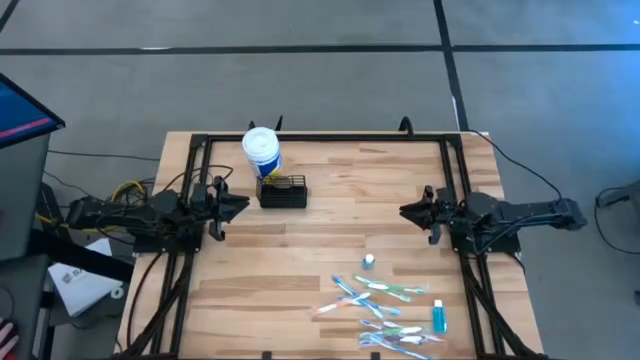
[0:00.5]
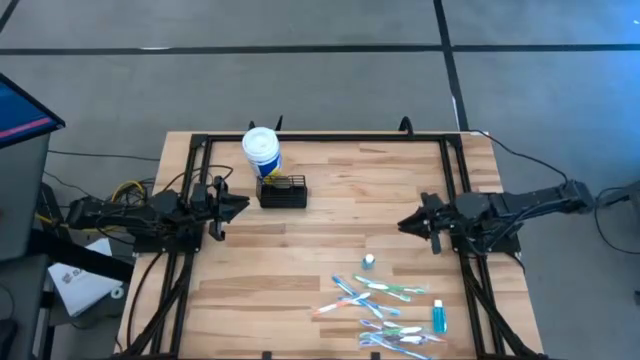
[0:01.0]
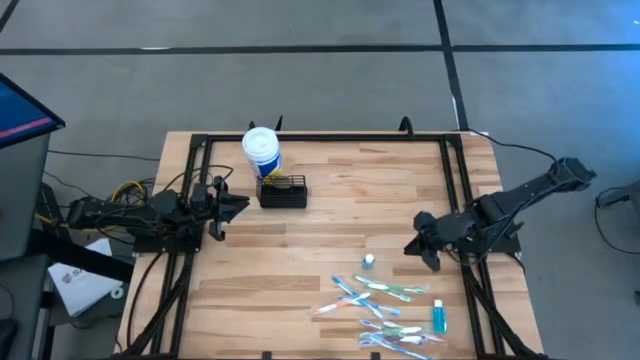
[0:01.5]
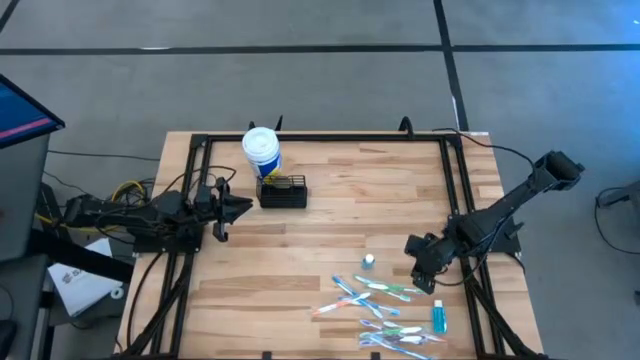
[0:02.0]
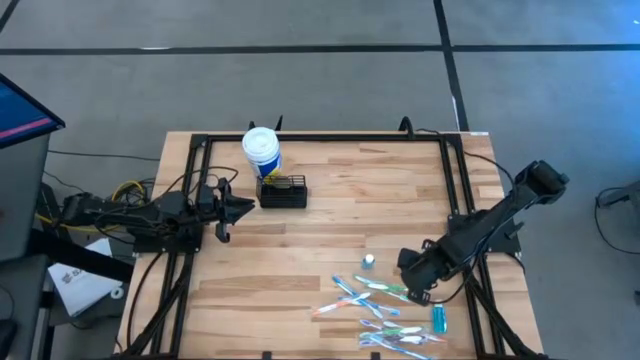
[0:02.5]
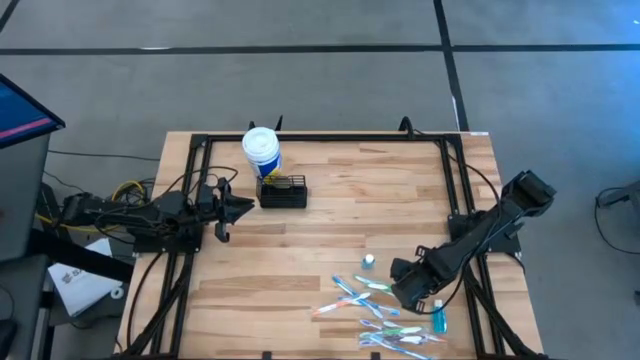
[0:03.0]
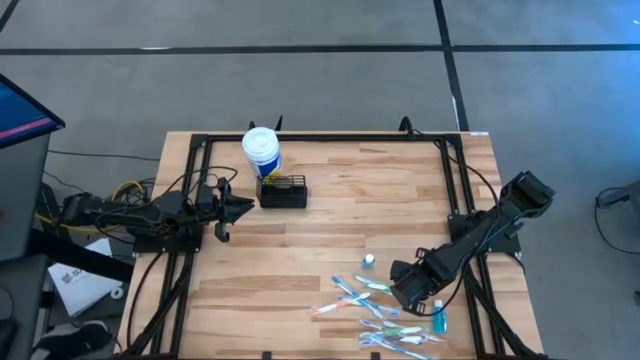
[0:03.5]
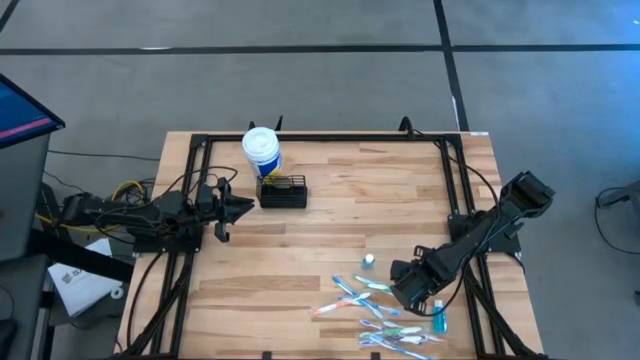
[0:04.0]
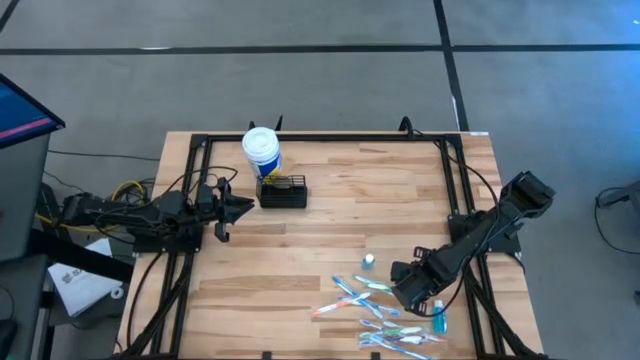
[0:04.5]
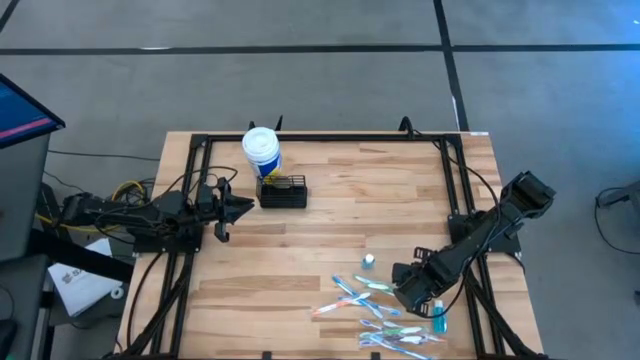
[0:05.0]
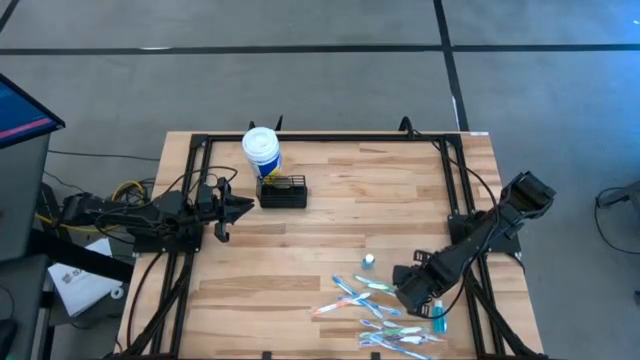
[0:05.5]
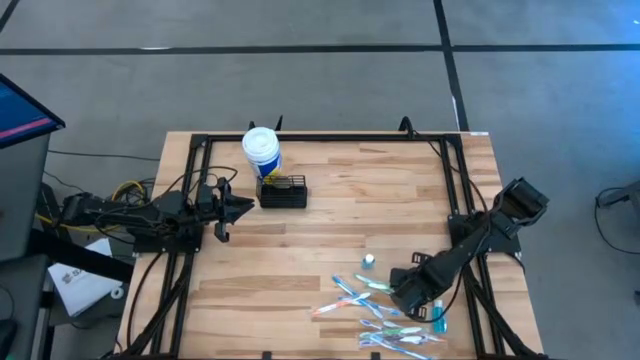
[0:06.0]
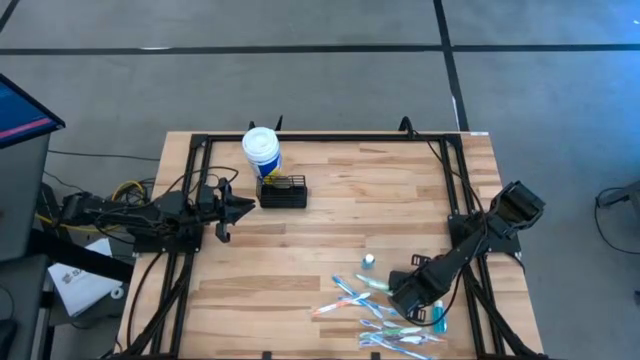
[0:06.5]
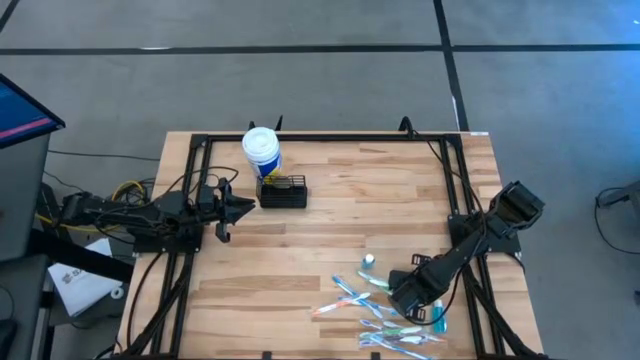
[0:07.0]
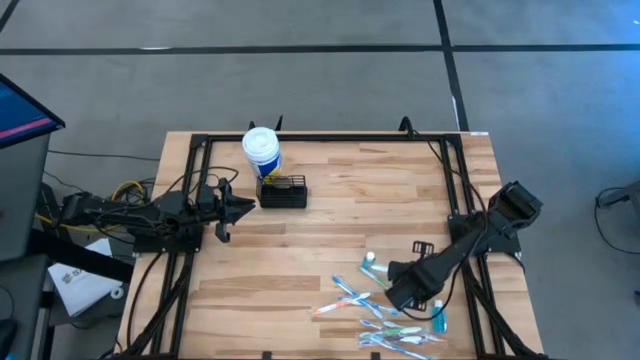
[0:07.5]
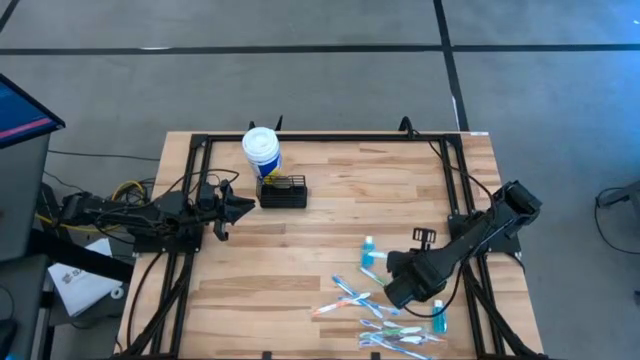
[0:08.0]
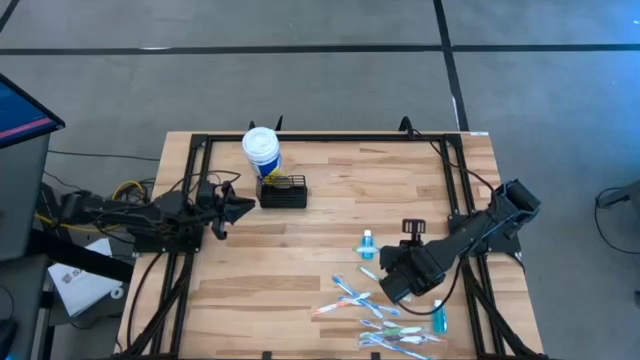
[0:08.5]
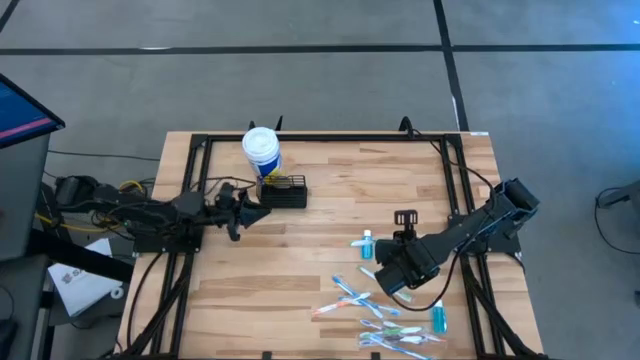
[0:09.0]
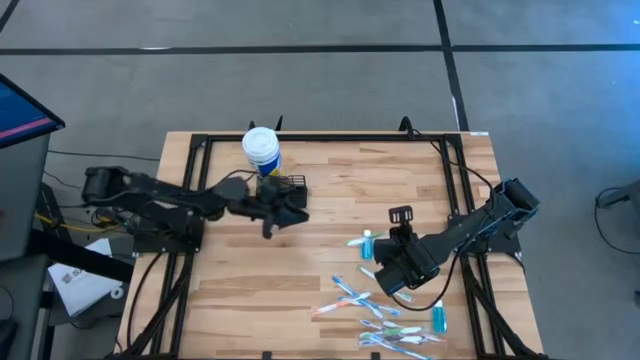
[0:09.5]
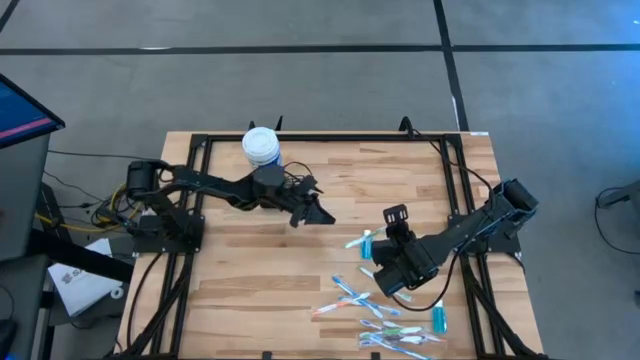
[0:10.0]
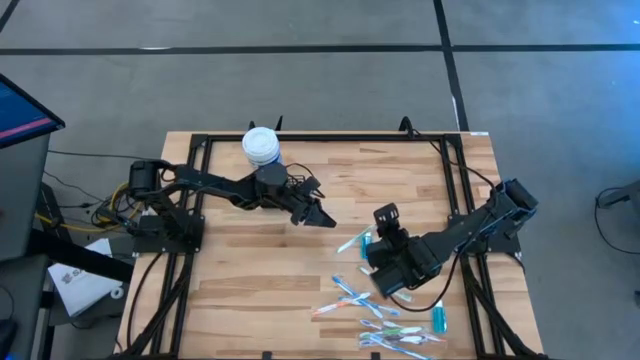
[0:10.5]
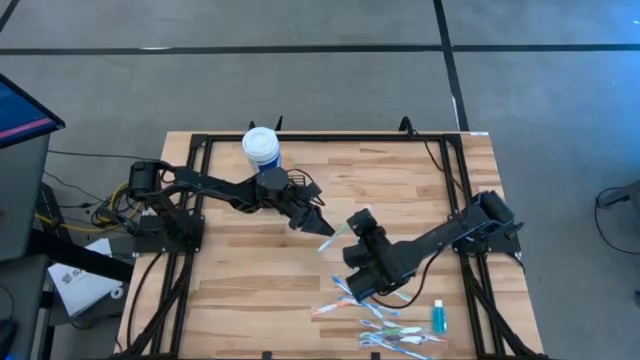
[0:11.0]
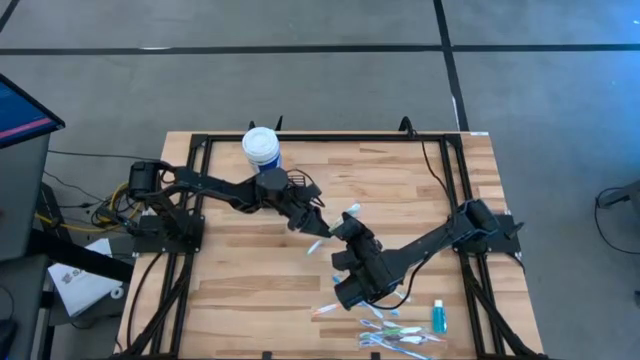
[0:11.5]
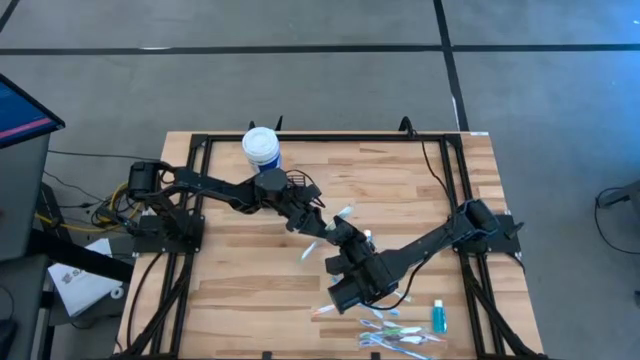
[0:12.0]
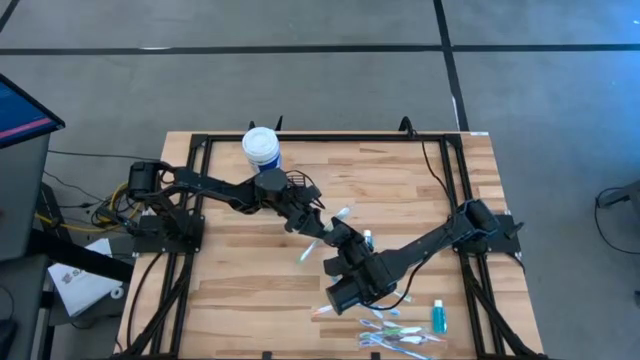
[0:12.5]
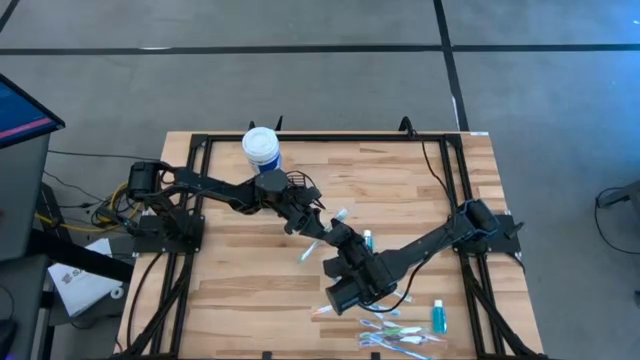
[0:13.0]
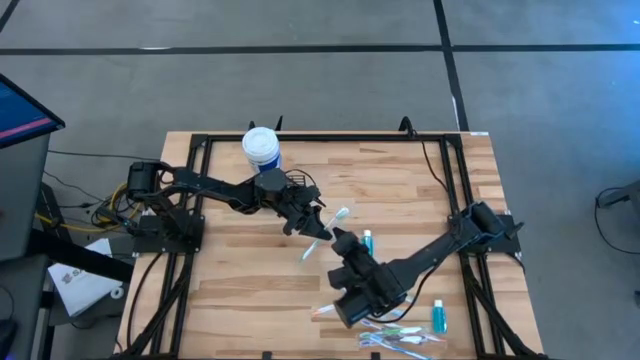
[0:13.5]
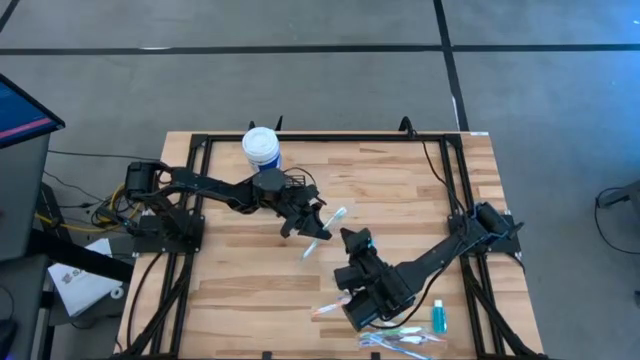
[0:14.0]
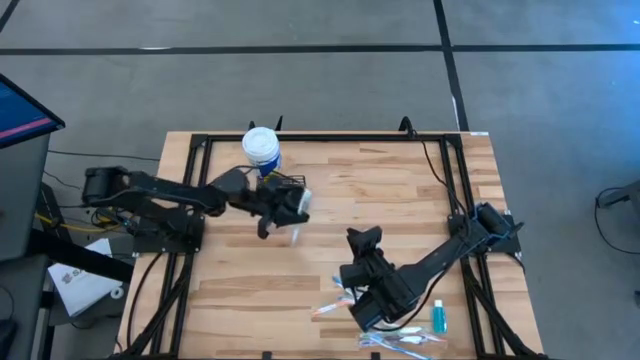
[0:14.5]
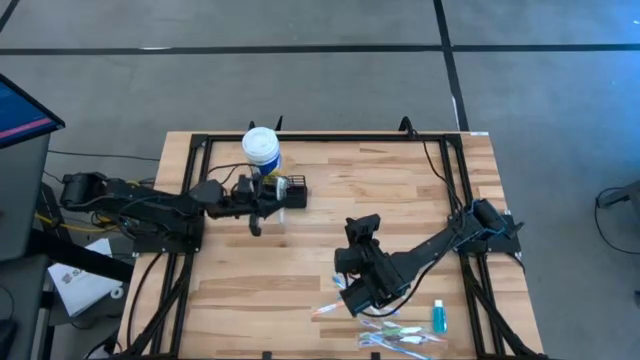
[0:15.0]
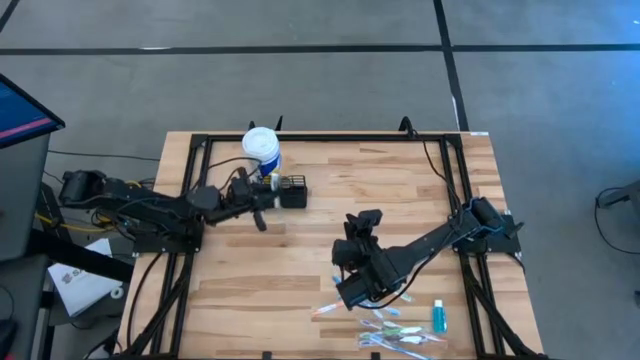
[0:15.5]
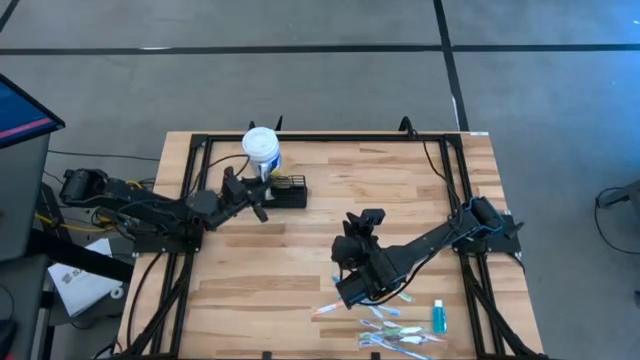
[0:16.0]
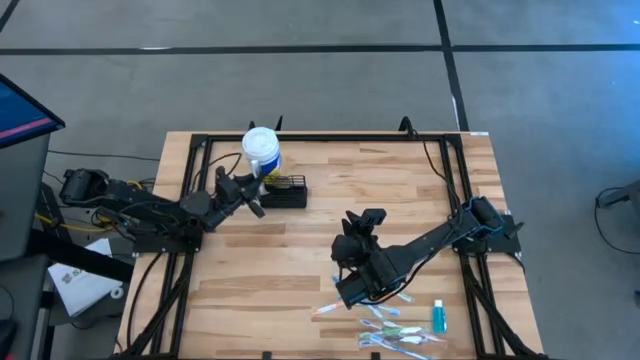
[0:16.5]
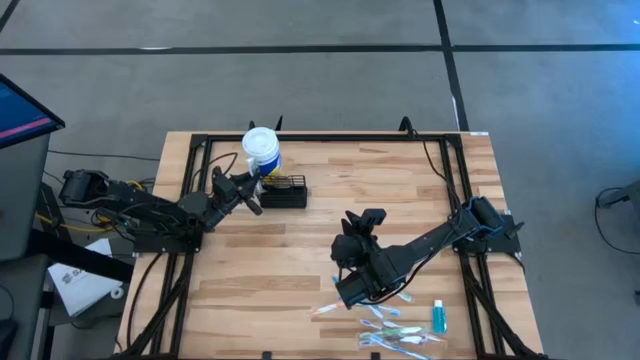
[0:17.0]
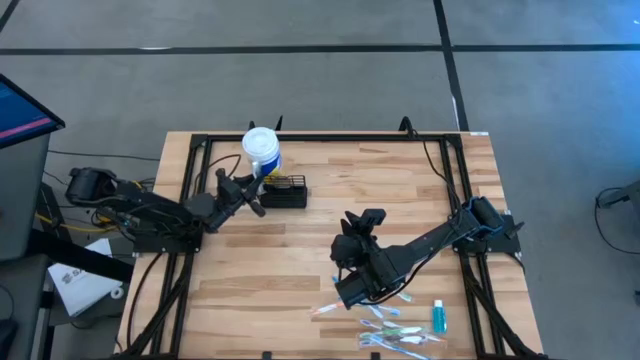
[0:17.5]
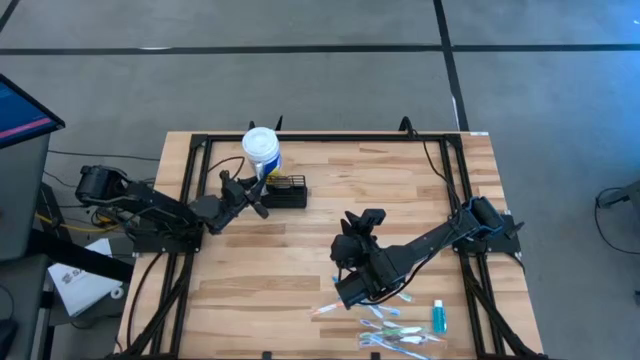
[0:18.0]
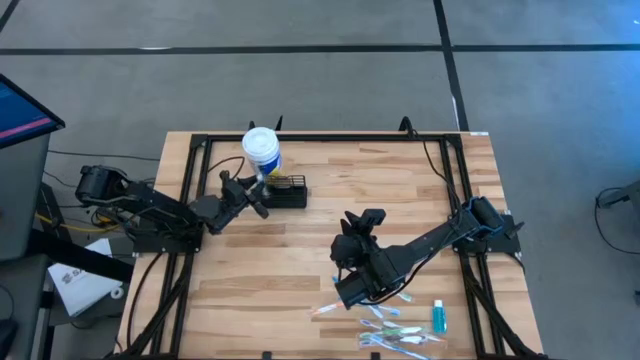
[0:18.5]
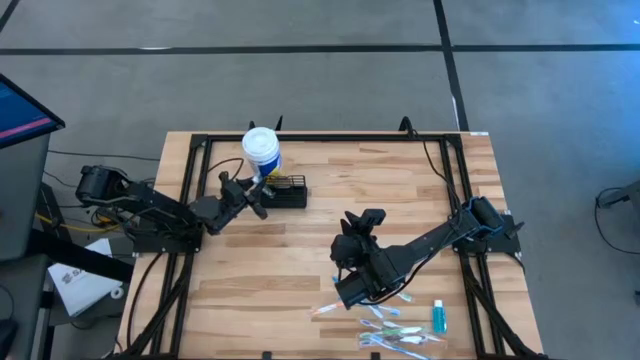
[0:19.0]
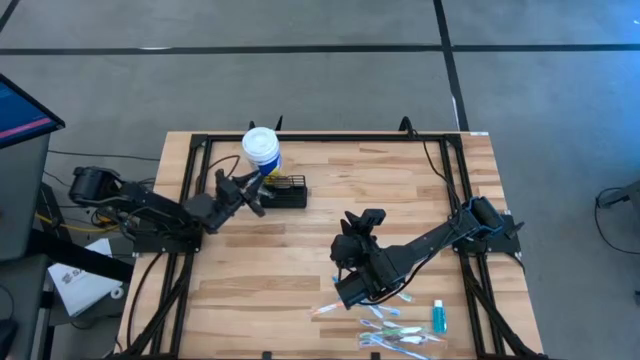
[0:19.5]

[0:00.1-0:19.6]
Task: Pick & Place toothbrushing station
Put the green toothbrush into the wire organizer
